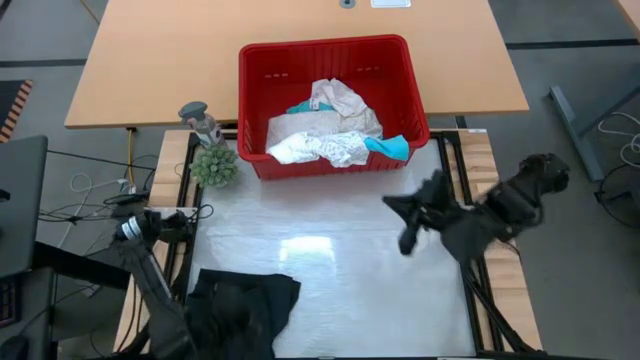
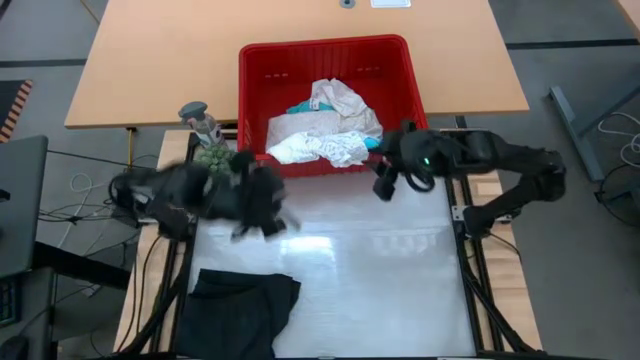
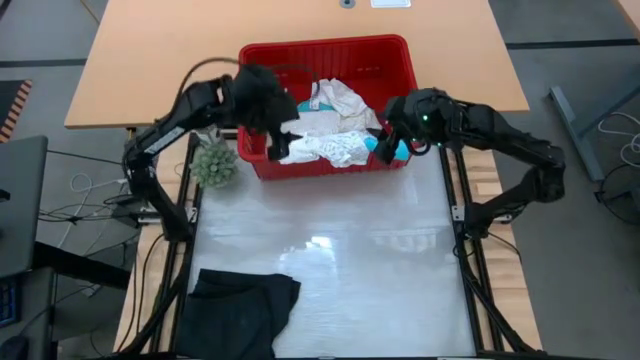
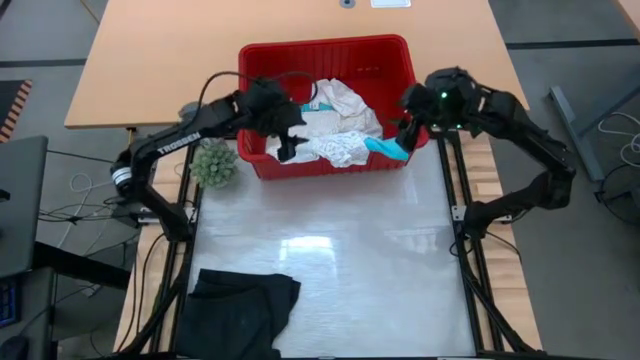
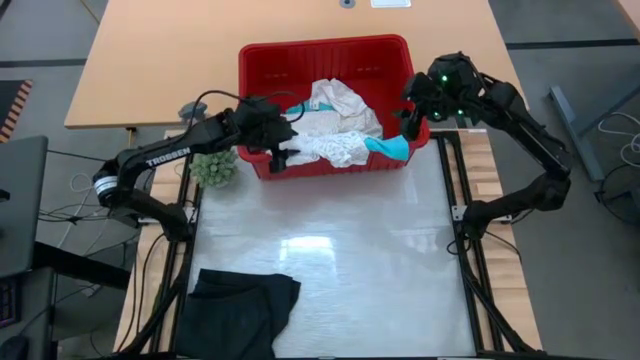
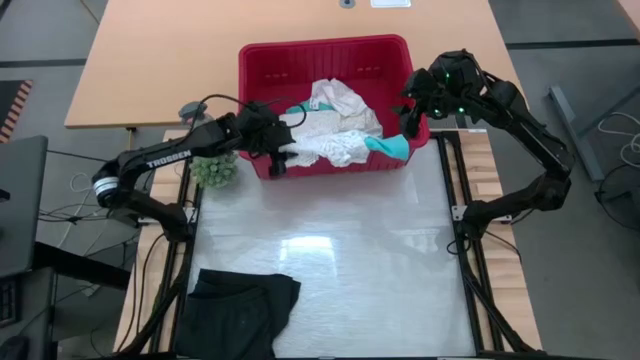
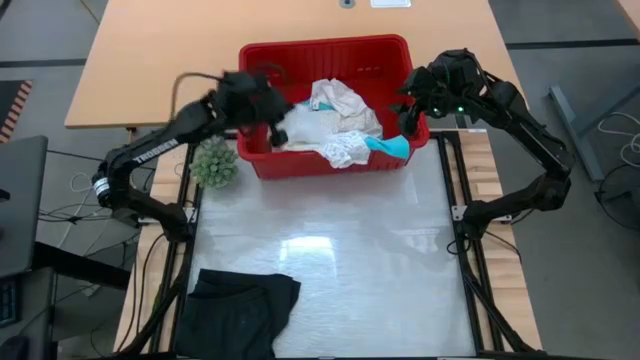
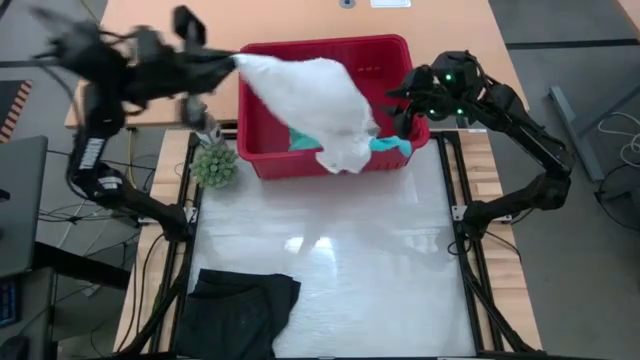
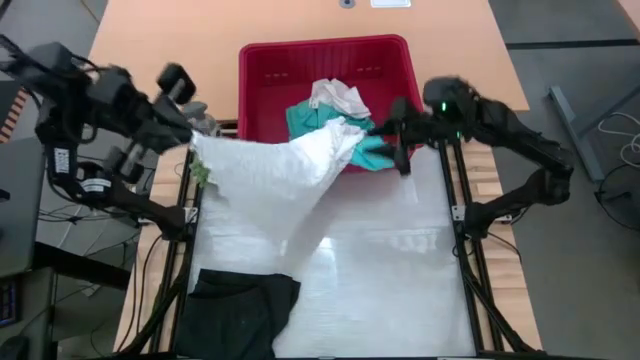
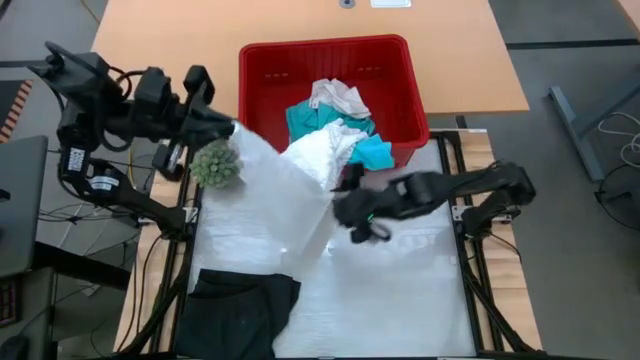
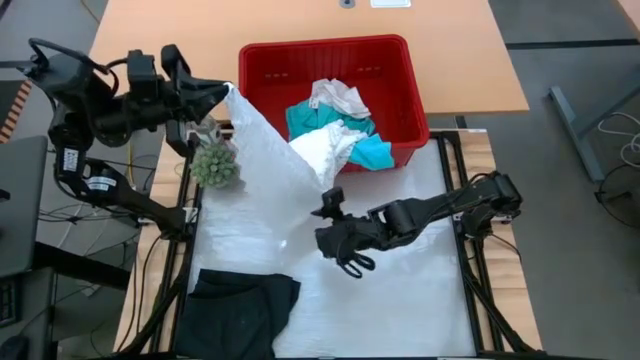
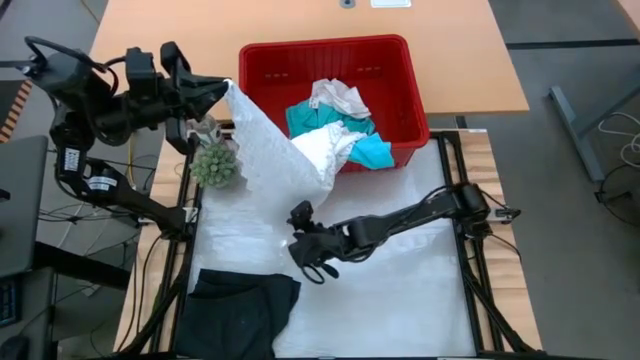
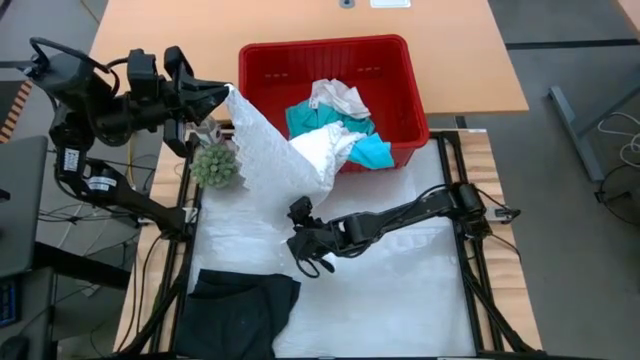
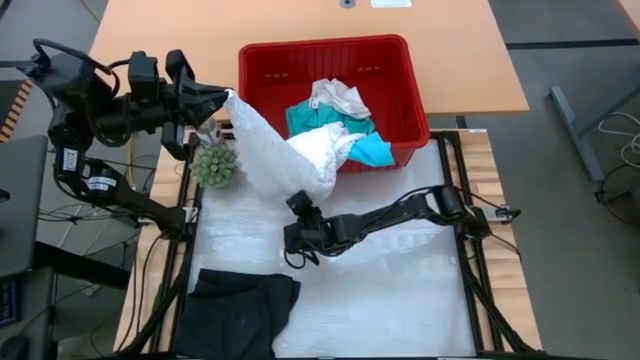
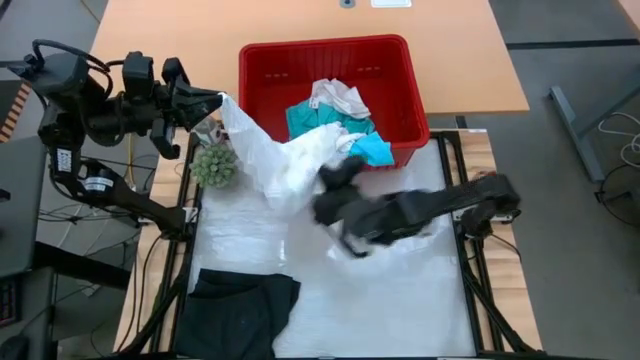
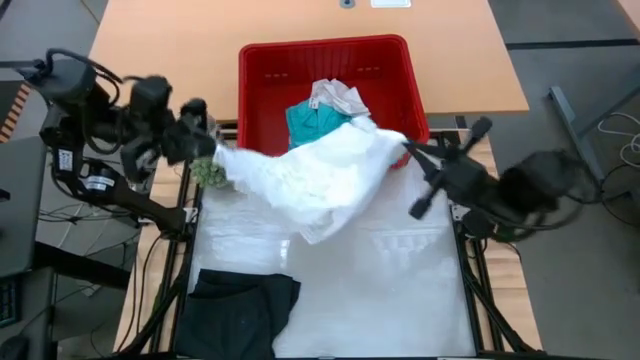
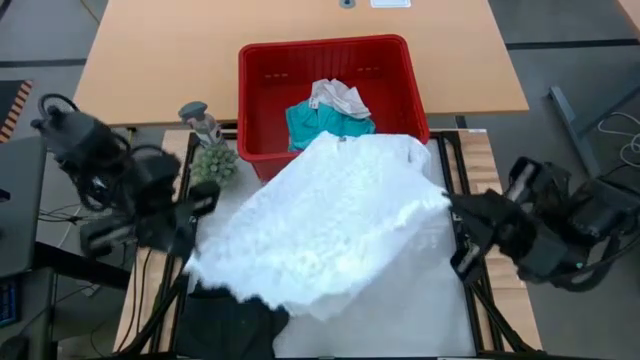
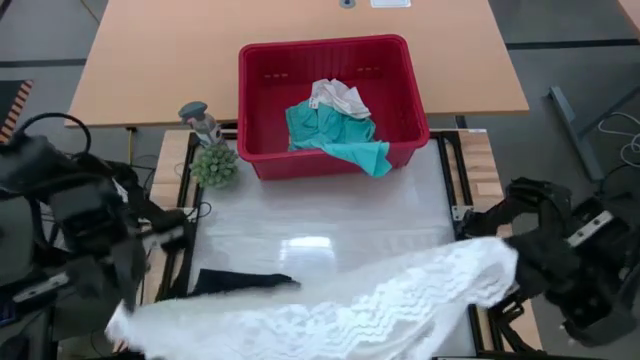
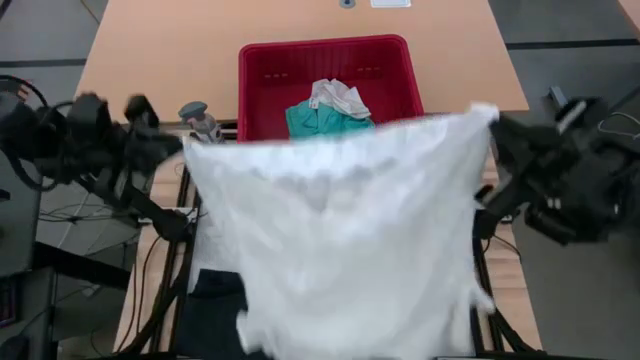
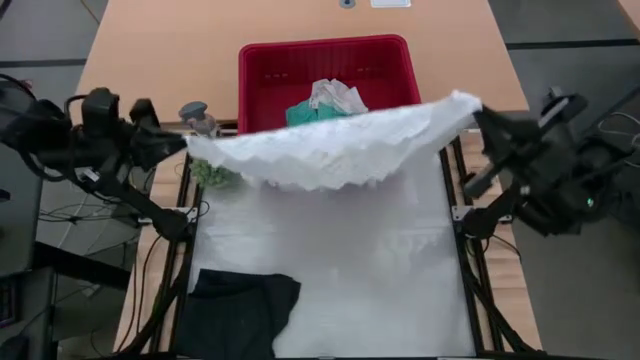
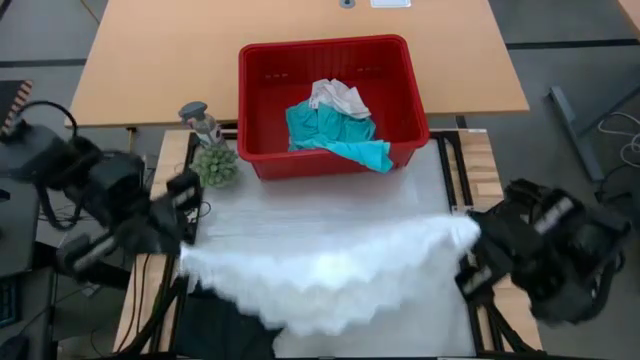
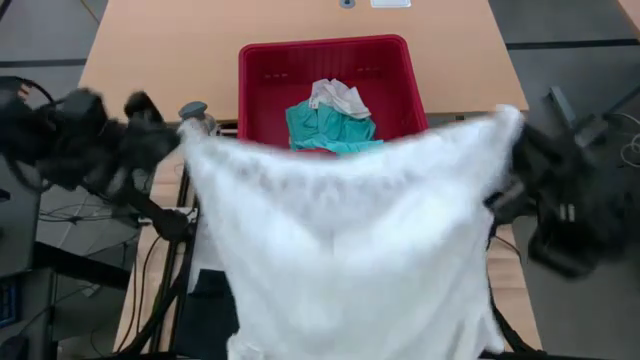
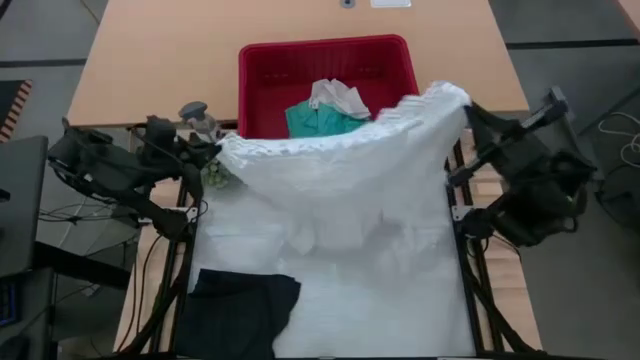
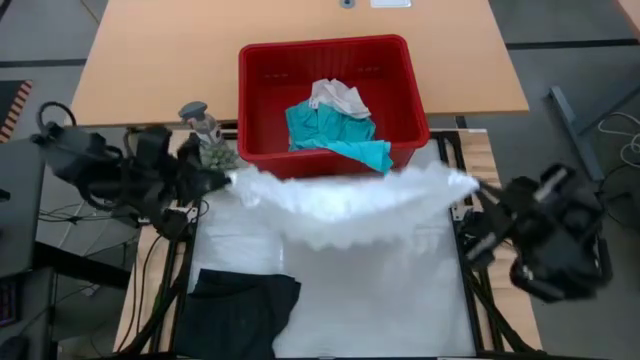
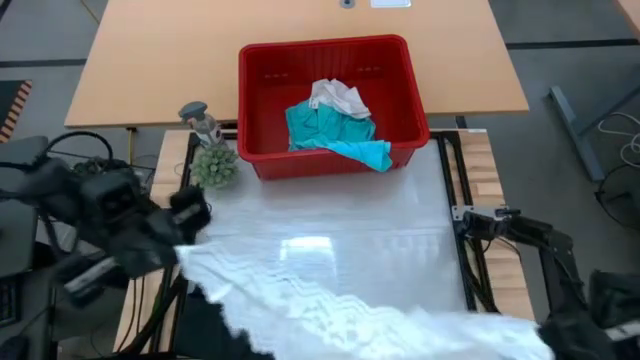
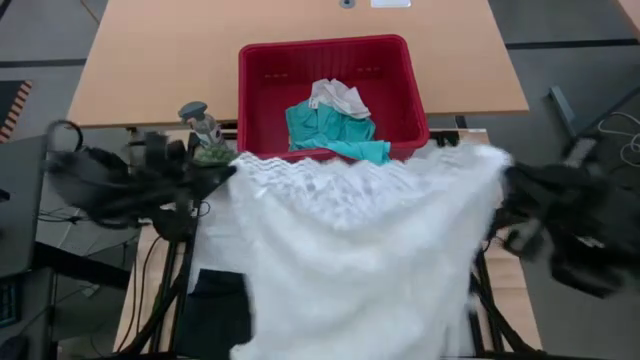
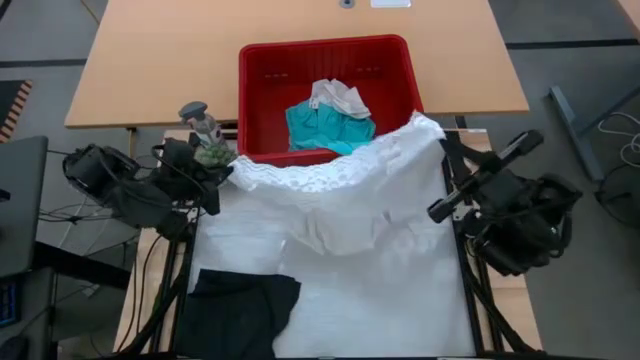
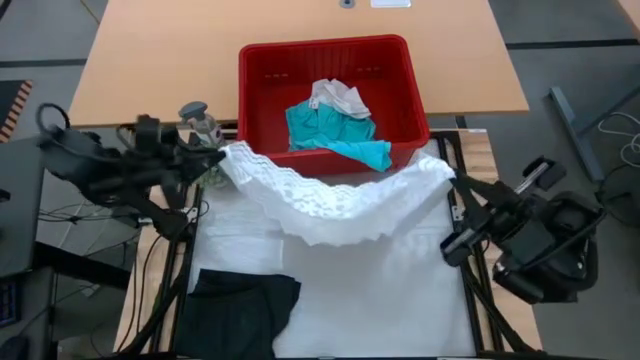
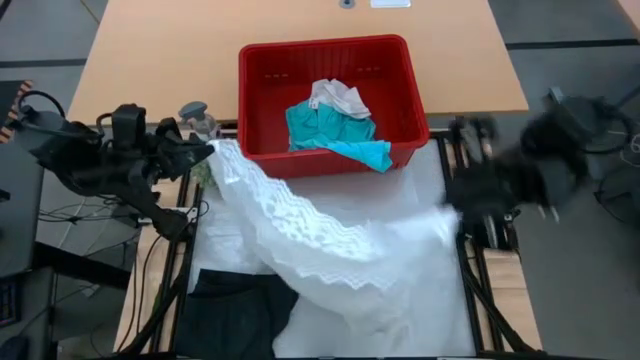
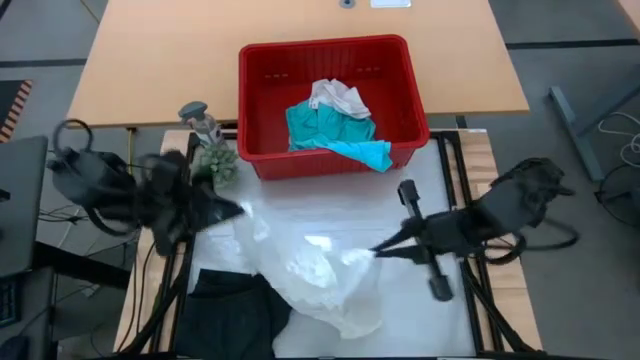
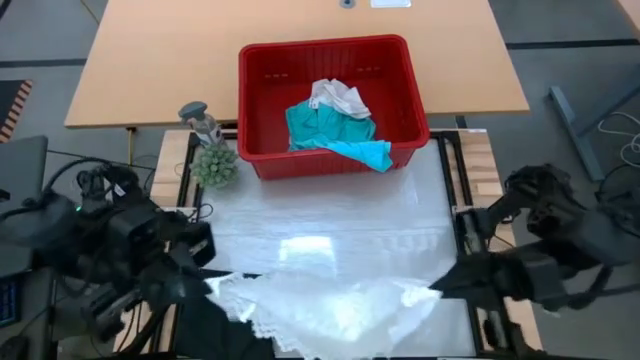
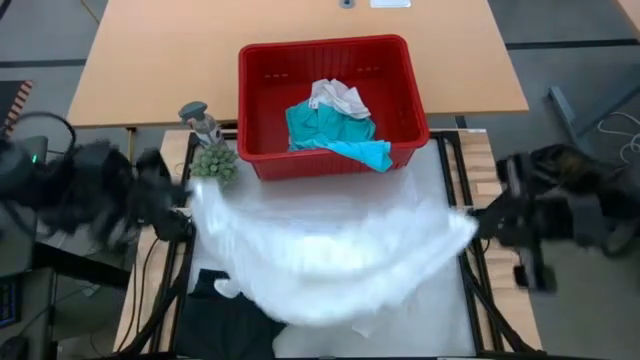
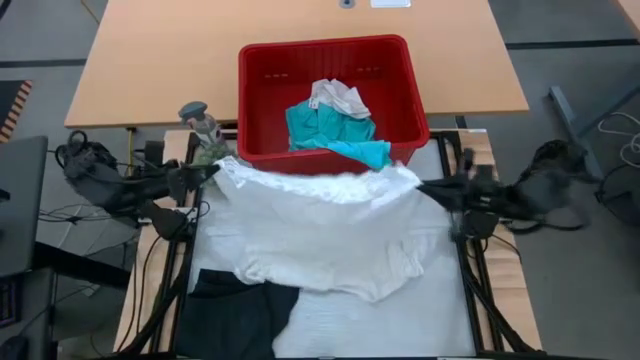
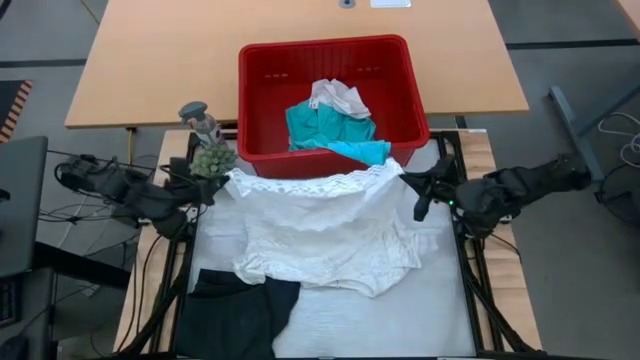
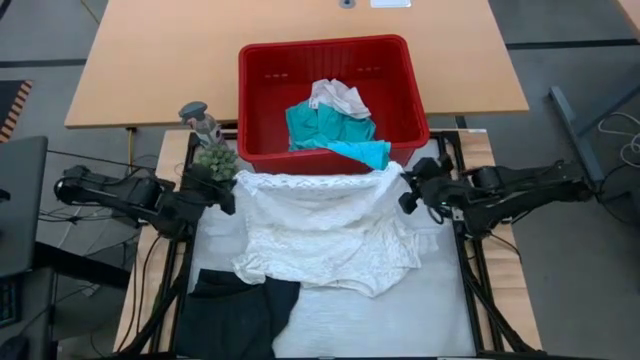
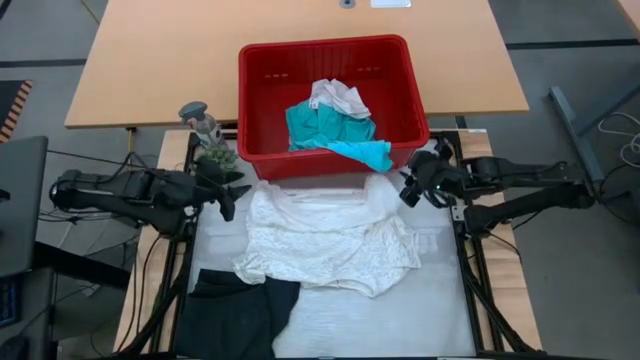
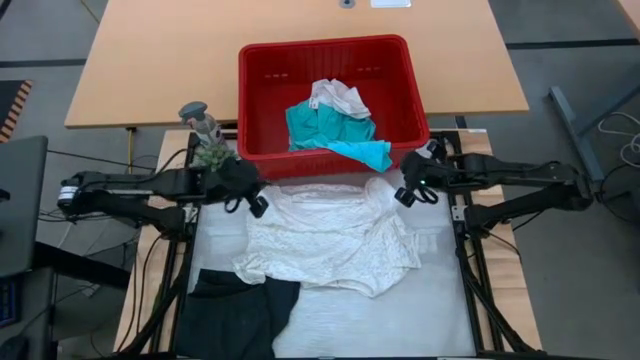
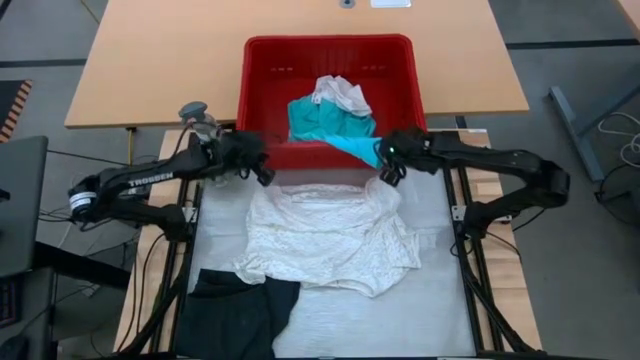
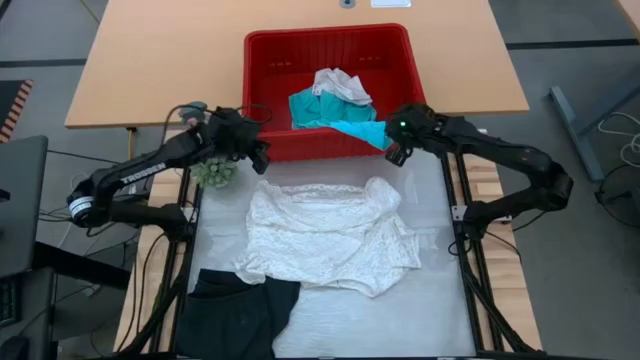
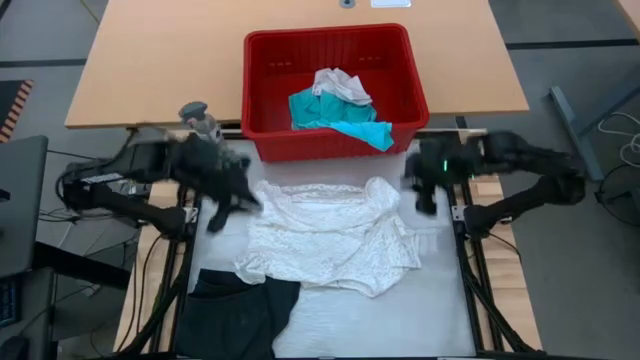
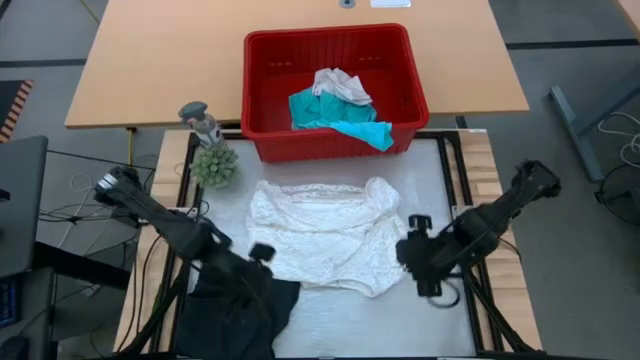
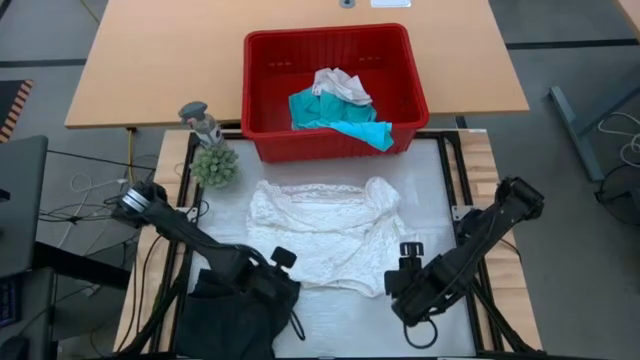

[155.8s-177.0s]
Task: Fold Laundry from Bin
Fold the white dress
